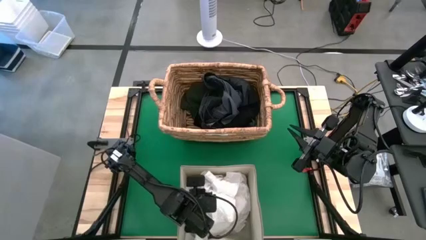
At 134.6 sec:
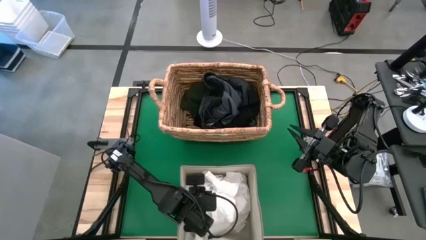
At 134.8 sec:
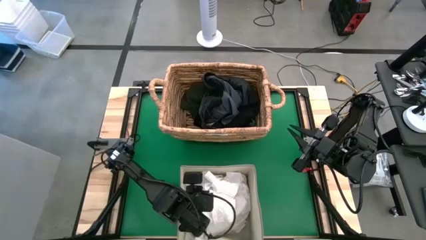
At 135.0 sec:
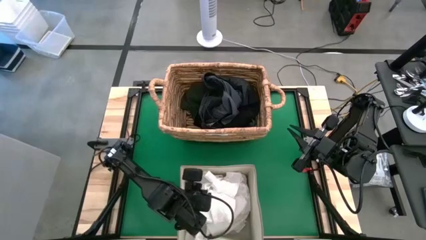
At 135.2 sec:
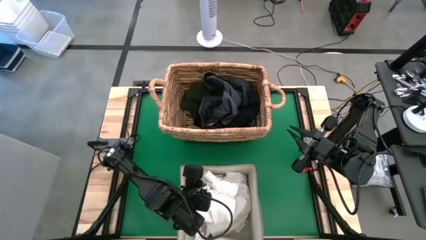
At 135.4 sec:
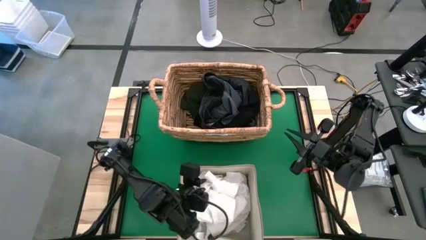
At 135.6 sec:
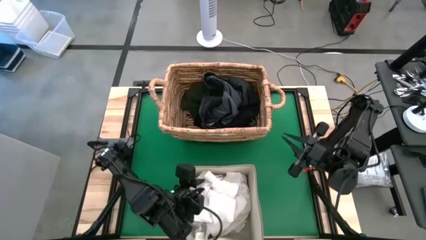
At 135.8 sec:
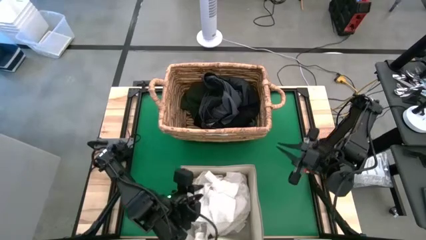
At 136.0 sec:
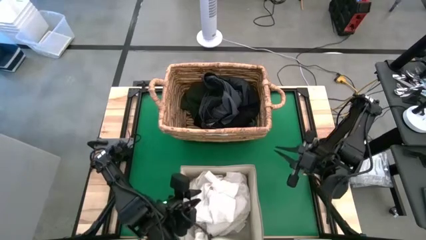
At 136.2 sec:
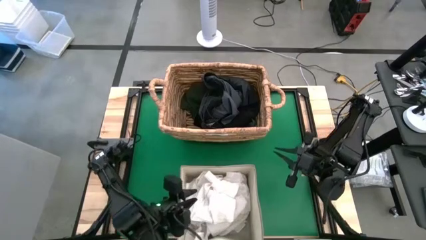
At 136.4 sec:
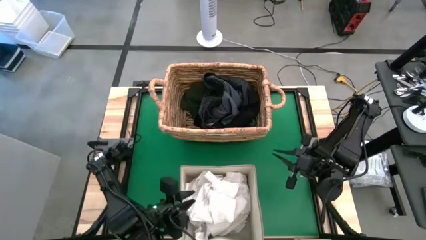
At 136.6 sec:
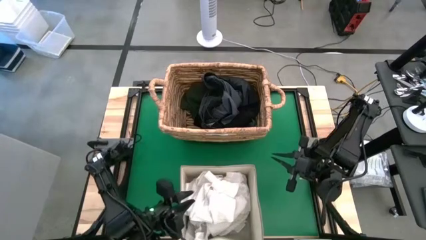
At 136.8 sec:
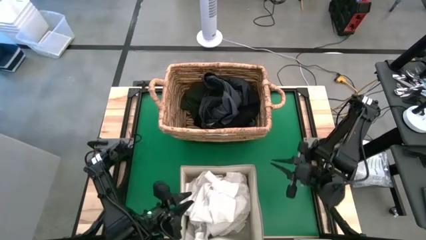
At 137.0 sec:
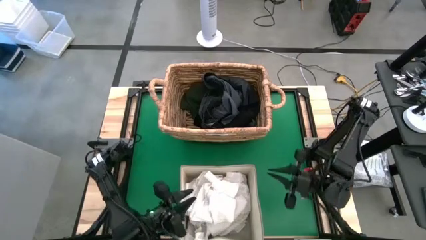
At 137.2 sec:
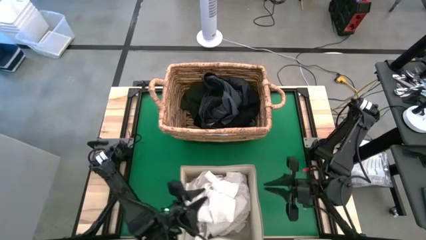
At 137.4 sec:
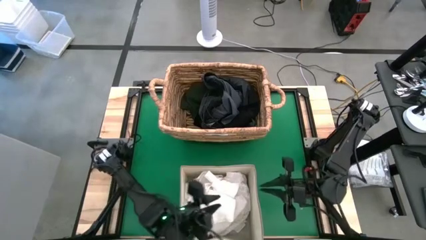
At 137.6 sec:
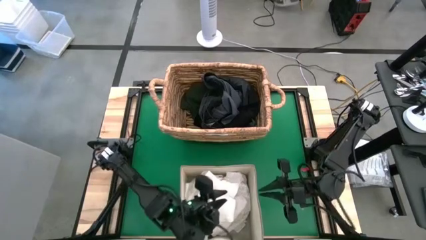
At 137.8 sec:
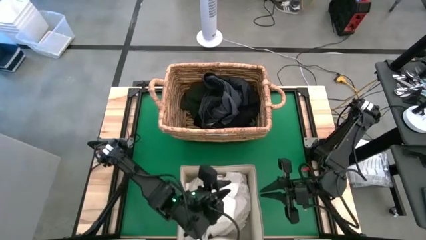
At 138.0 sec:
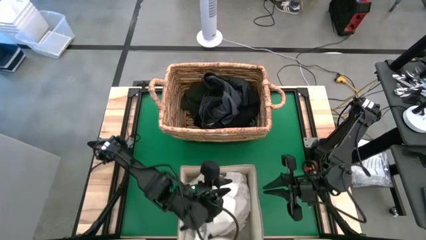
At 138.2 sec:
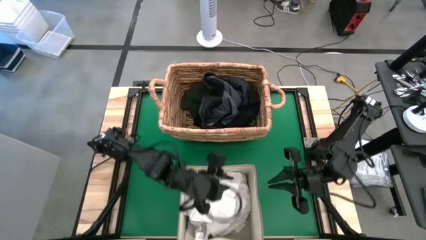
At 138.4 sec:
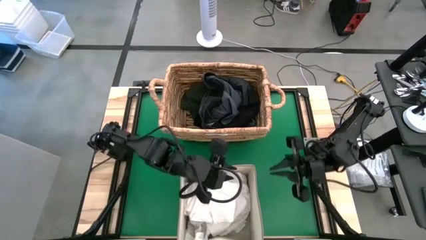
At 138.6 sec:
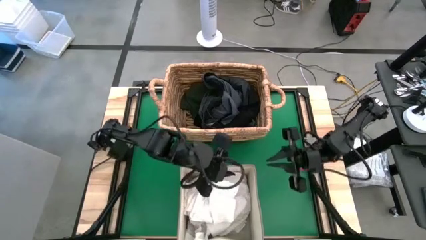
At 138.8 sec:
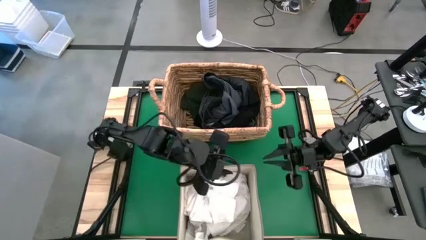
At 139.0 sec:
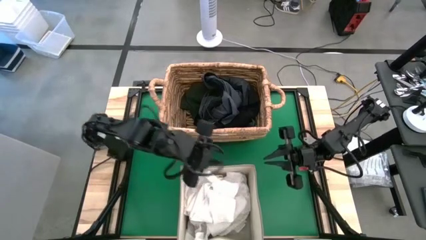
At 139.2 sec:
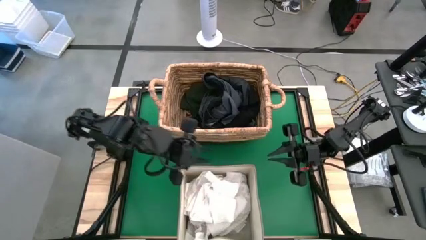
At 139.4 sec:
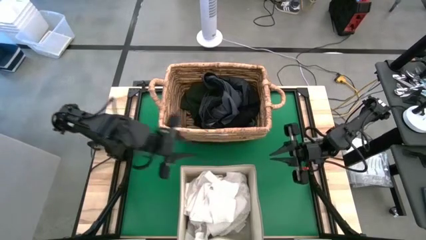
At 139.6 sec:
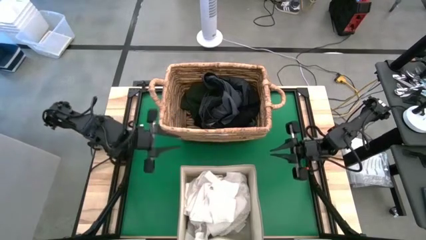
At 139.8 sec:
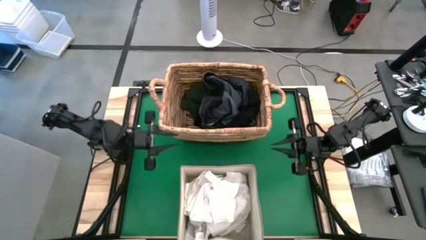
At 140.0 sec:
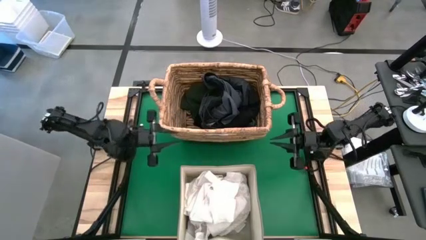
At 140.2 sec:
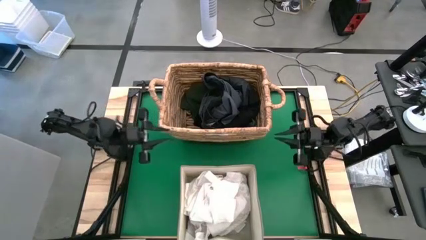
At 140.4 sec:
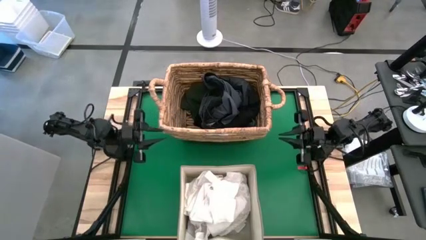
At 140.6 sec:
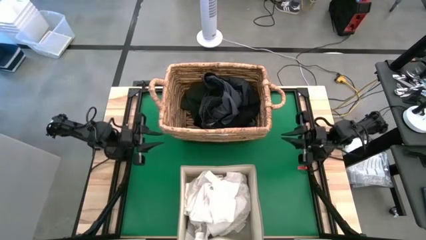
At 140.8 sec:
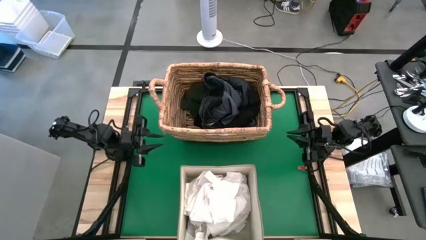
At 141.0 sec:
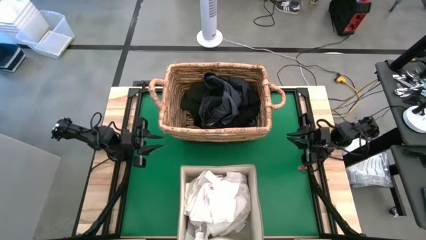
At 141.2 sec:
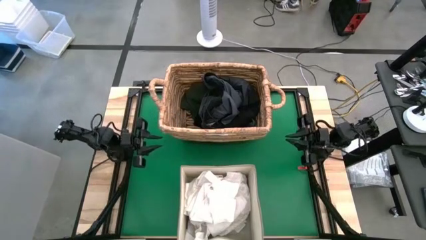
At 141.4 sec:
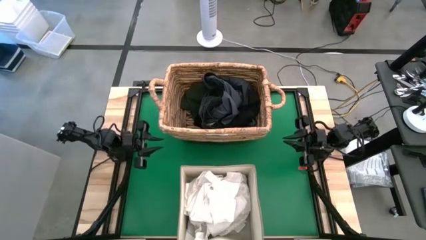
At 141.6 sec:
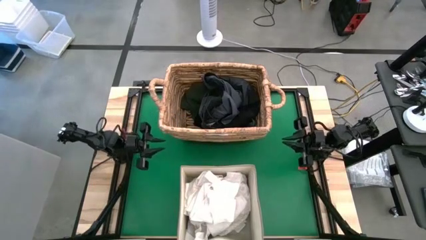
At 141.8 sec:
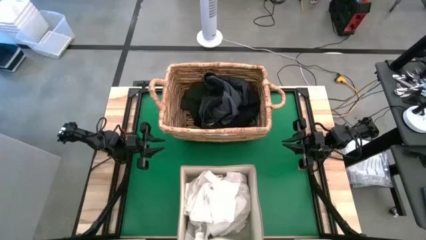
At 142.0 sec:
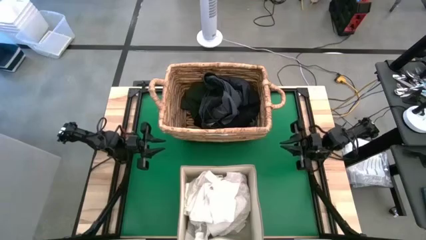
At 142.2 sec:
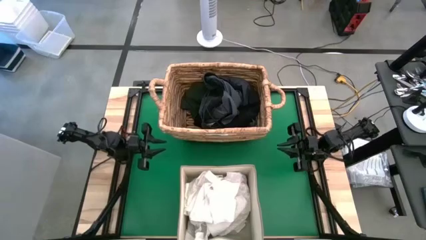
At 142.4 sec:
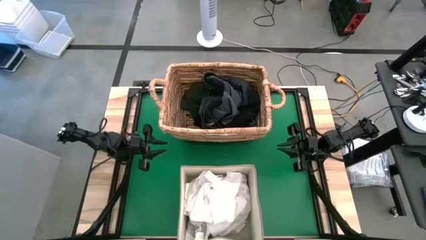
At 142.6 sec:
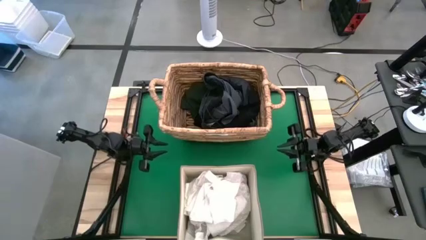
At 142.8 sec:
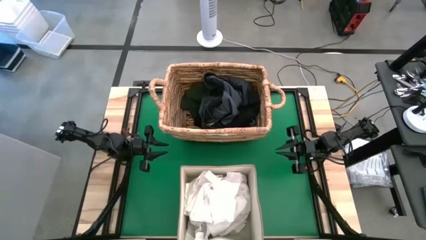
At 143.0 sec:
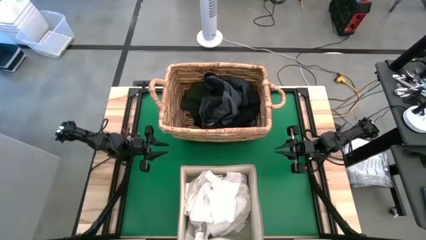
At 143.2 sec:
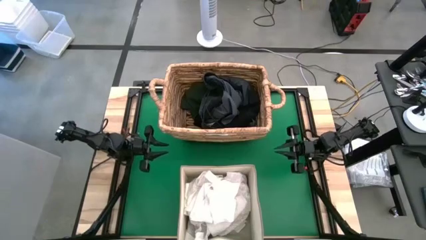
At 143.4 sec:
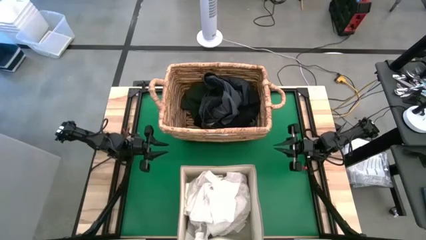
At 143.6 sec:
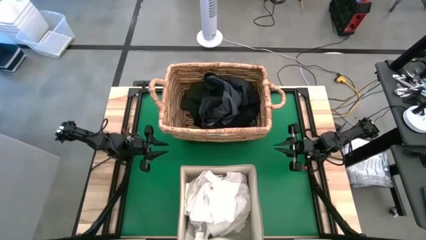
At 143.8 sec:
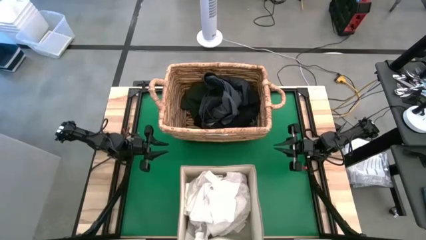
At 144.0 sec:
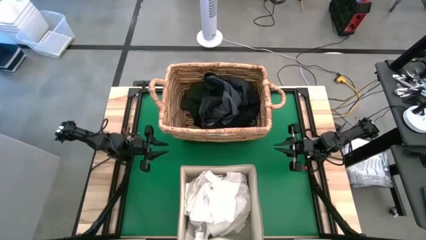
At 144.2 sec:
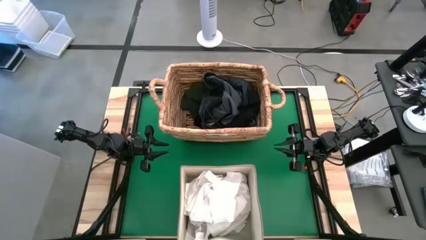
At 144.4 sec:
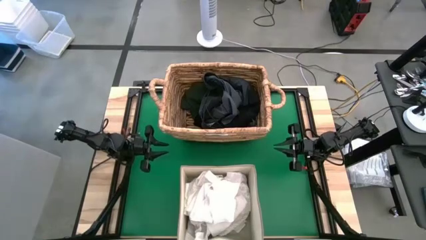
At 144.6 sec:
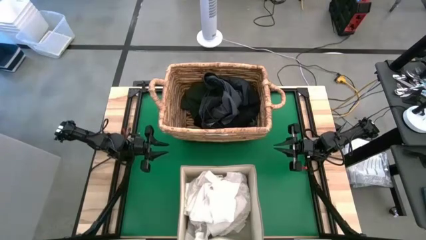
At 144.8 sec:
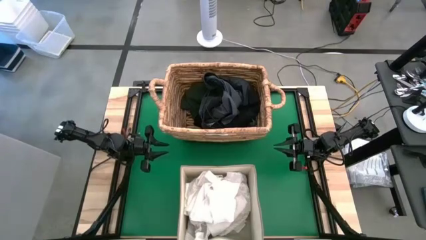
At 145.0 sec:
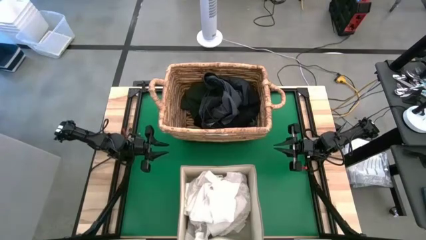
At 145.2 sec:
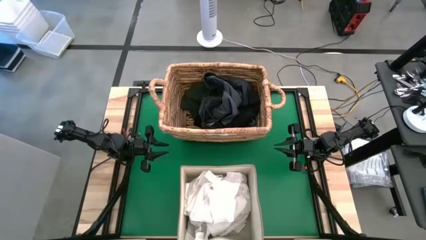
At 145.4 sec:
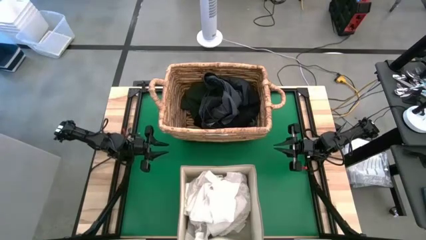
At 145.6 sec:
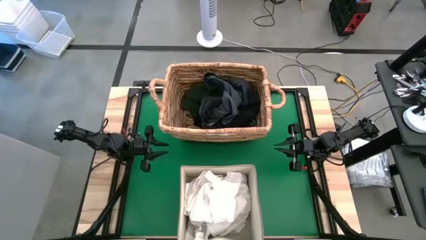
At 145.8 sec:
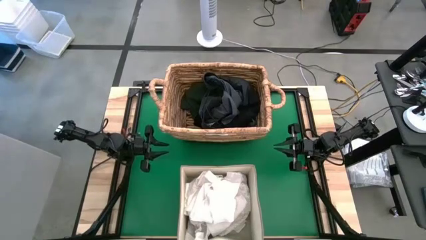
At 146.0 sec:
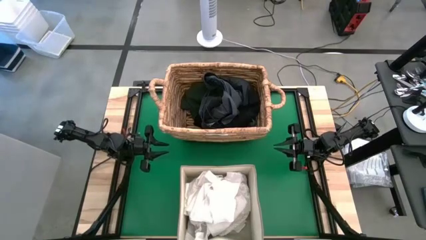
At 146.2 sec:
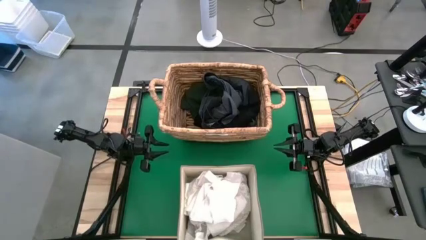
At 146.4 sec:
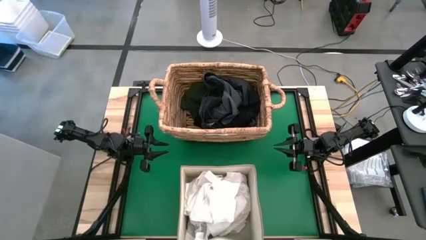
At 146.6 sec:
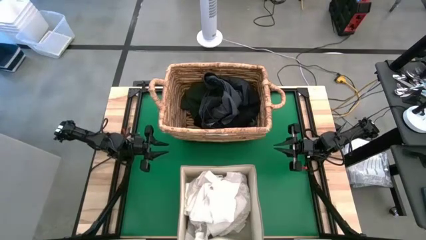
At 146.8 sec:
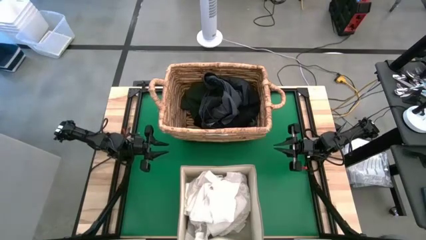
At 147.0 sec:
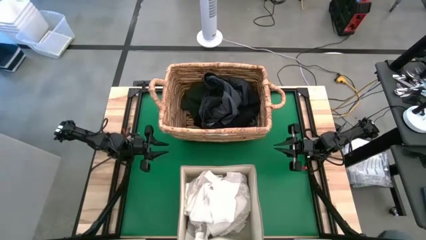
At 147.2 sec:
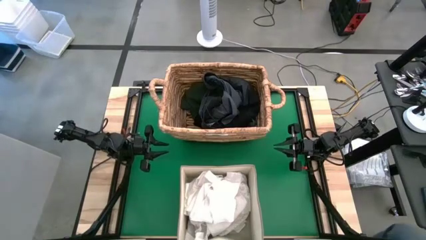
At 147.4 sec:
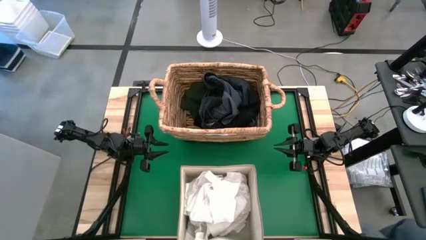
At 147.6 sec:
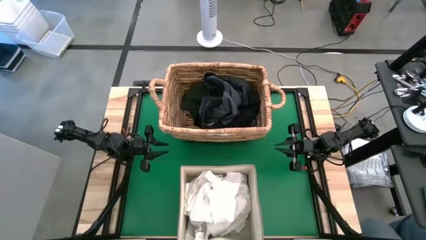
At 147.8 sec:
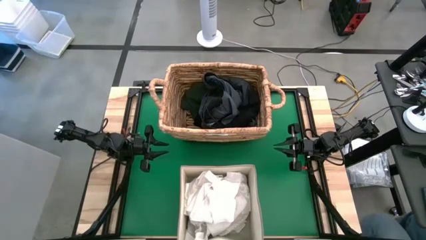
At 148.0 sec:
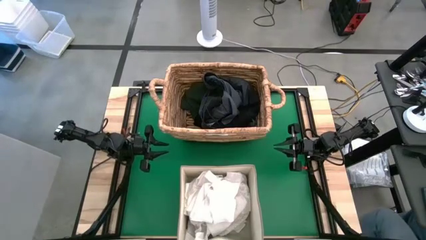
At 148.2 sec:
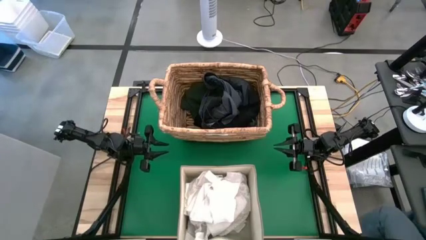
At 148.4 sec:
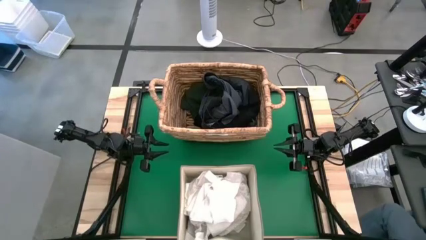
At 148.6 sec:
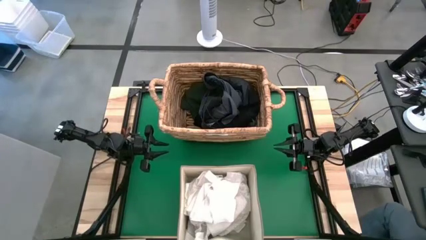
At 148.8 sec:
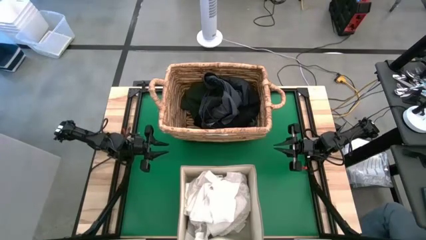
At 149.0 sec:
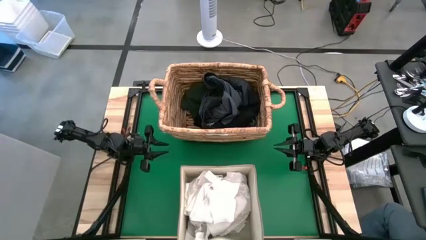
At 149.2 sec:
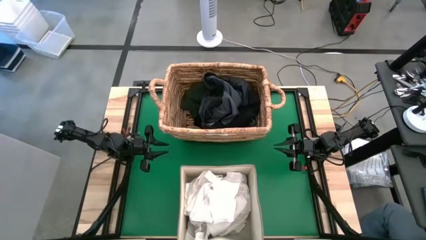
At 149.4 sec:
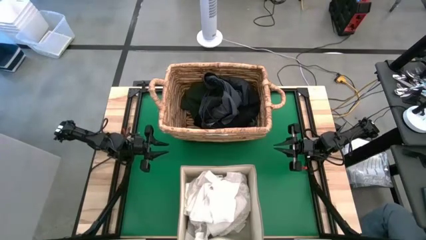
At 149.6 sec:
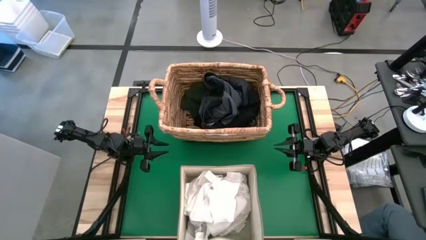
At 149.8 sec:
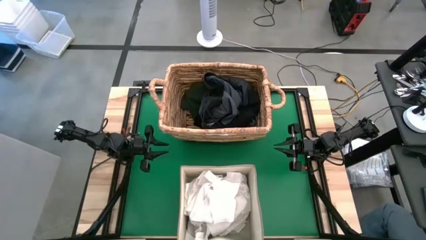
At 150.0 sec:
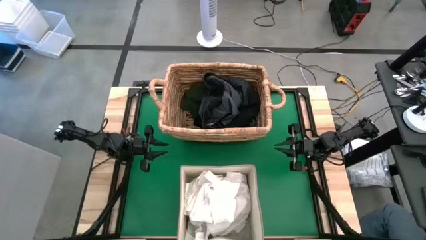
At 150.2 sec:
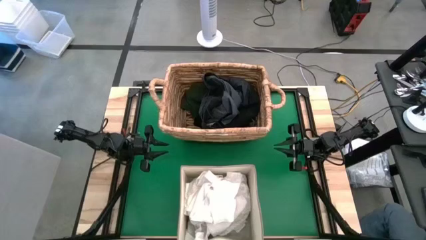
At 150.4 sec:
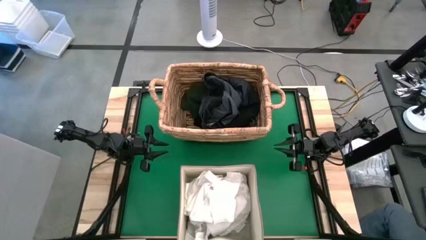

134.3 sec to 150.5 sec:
Return to Home Position
